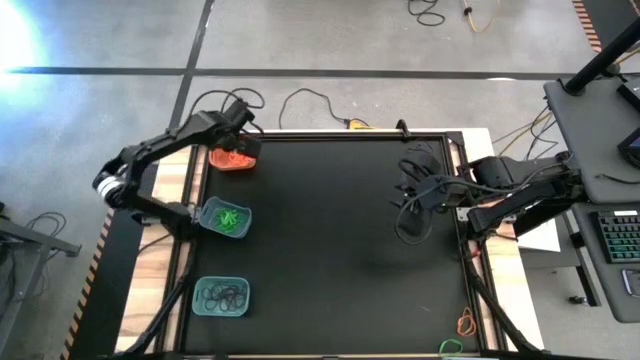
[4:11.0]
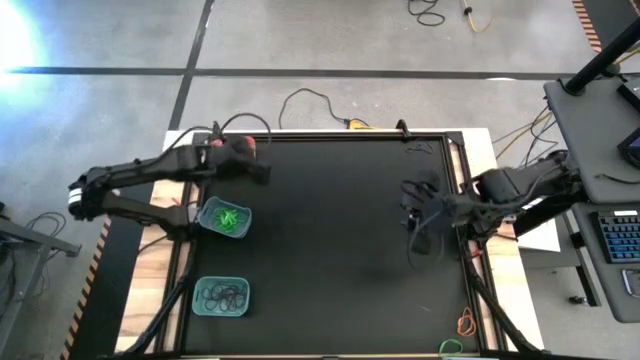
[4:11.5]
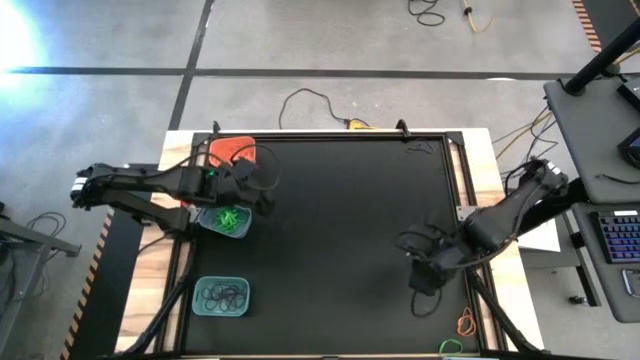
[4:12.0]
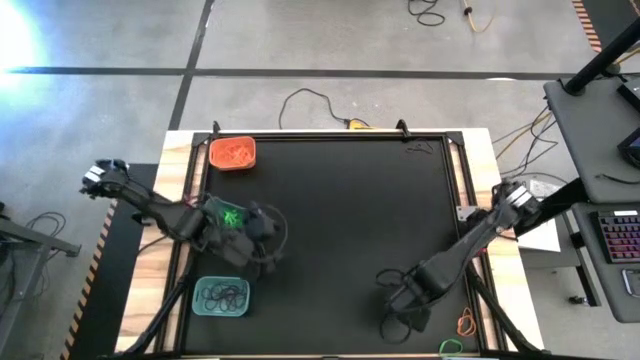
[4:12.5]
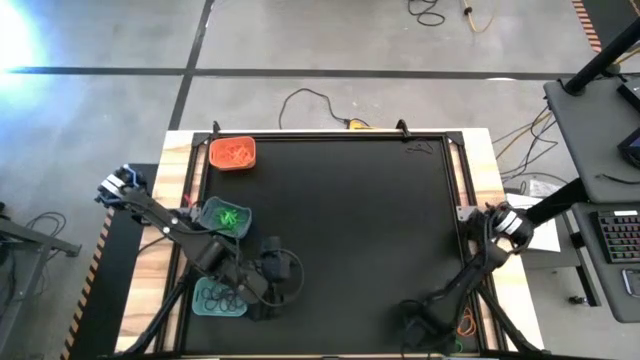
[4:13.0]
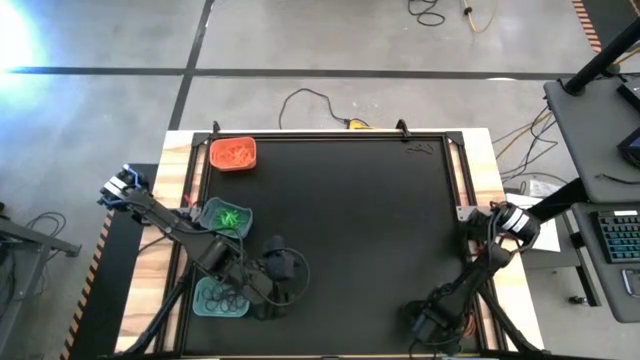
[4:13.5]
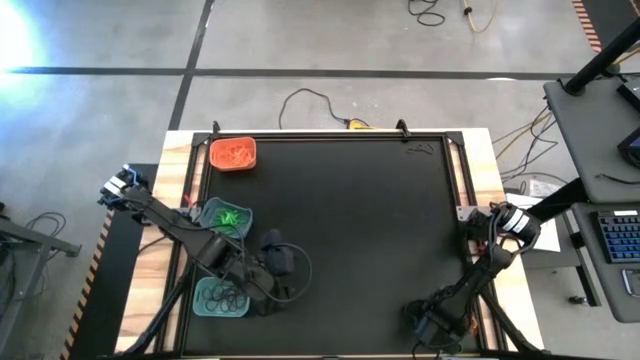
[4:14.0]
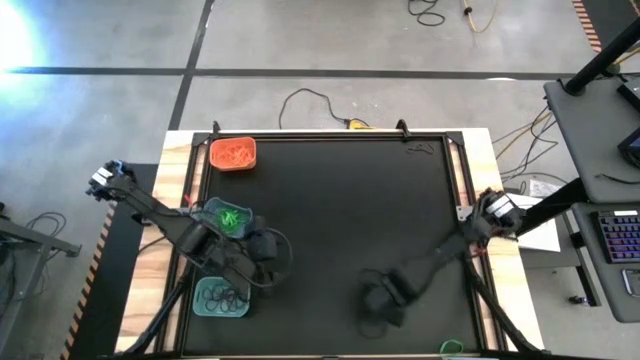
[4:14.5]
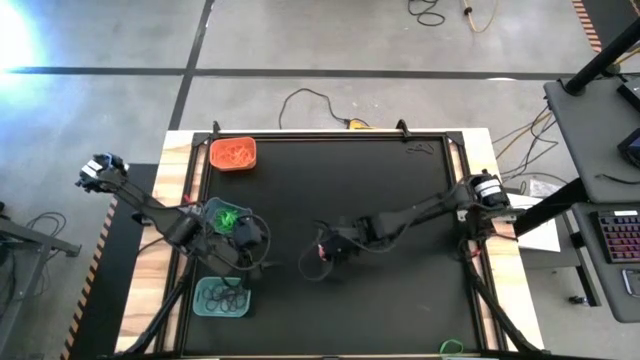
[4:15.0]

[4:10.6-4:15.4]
Task: Sort rubber bands into baskets
Put the orange rubber band into the orange bin

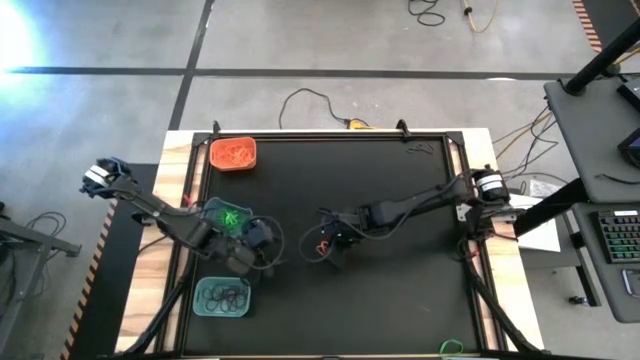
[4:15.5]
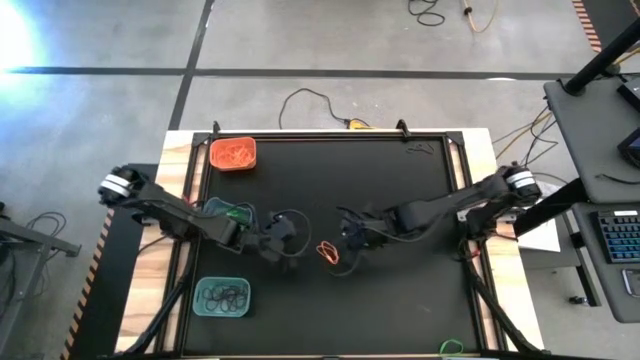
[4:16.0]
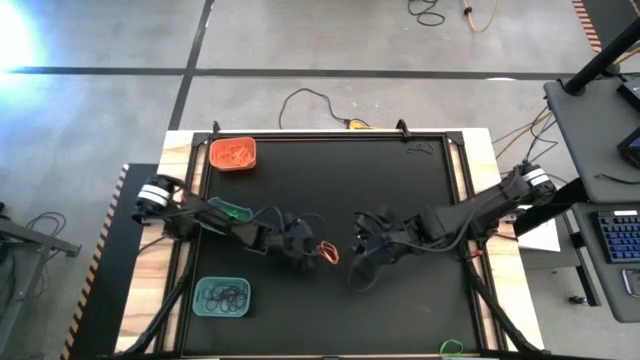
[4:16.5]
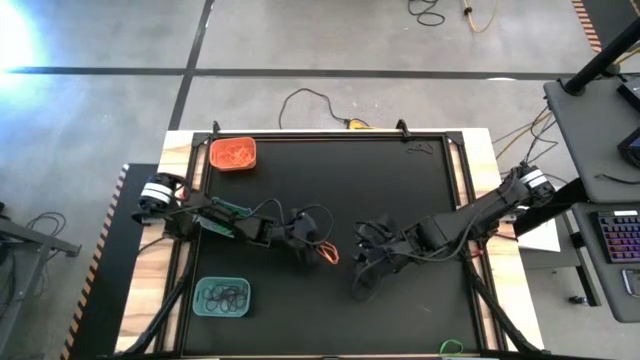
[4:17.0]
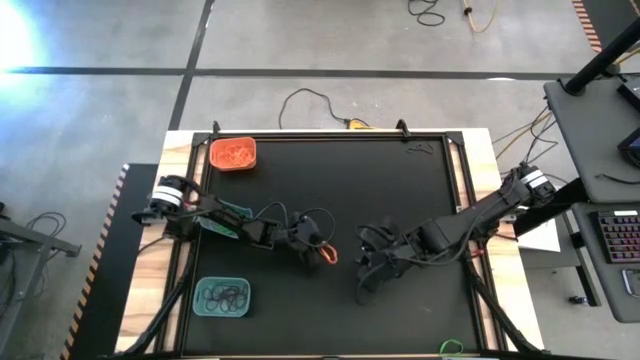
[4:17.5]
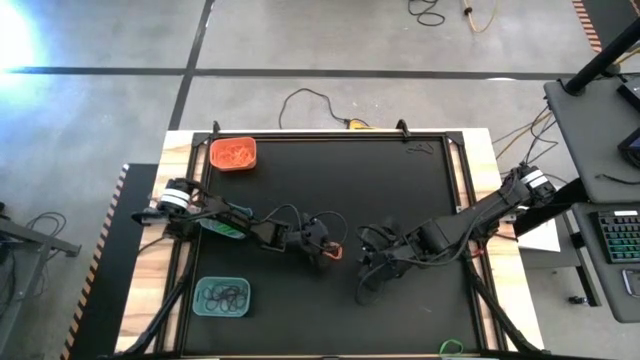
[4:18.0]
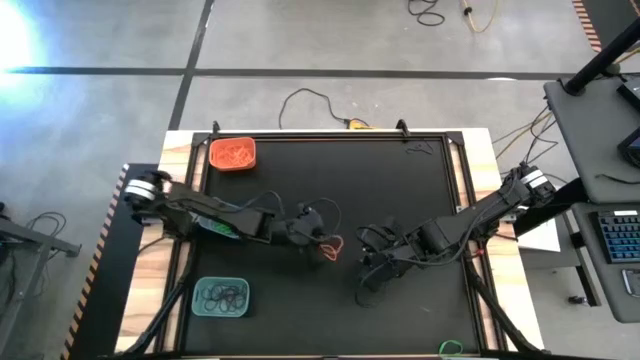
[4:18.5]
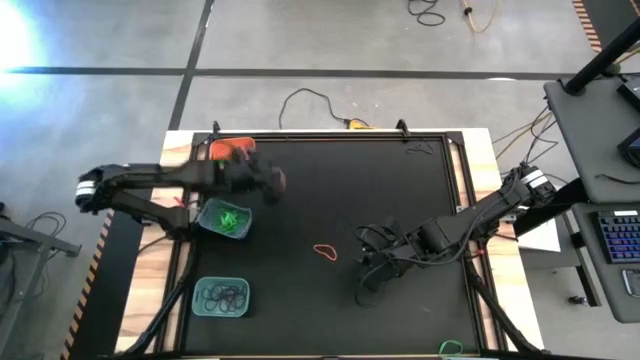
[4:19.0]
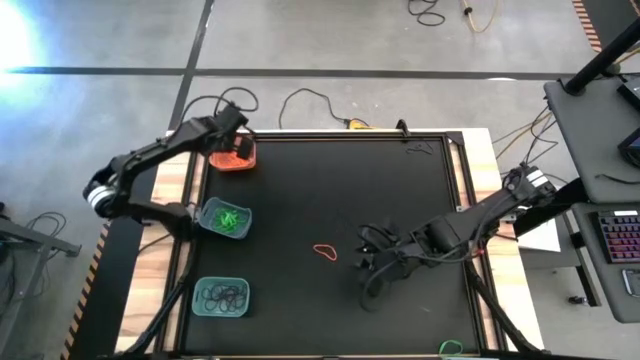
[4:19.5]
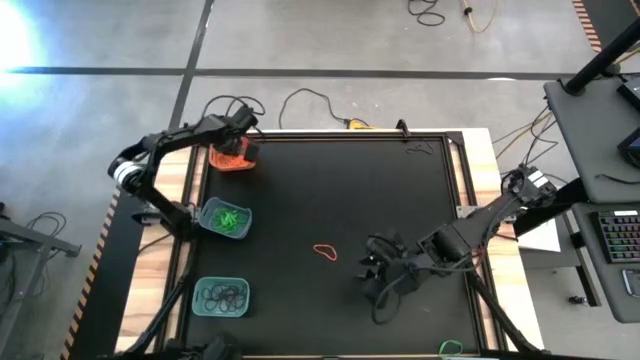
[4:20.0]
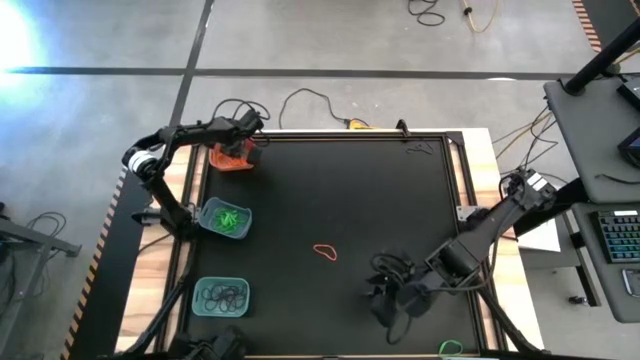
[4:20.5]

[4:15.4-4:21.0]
Put the orange rubber band into the orange bin

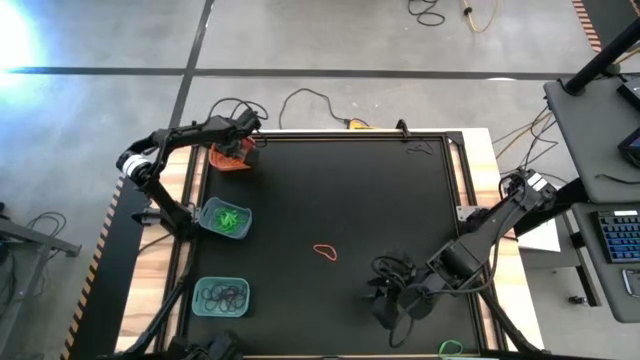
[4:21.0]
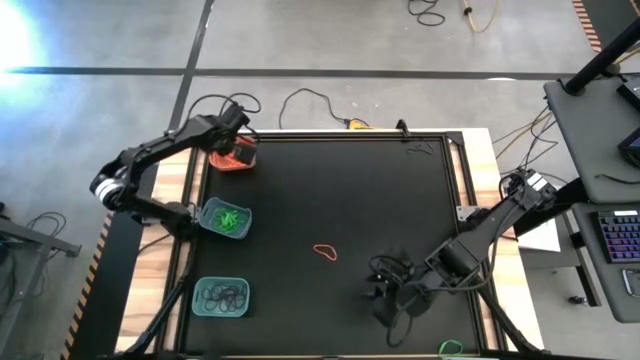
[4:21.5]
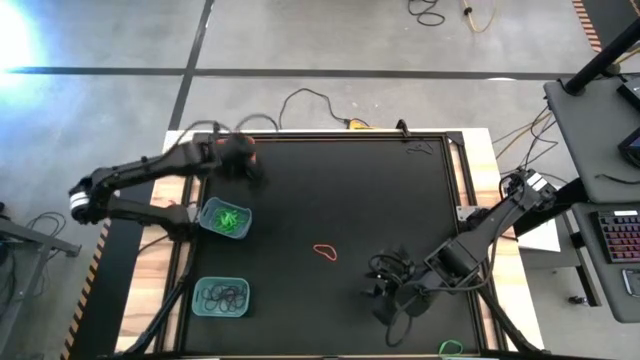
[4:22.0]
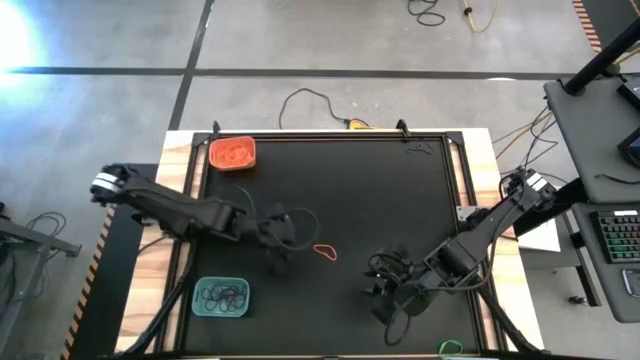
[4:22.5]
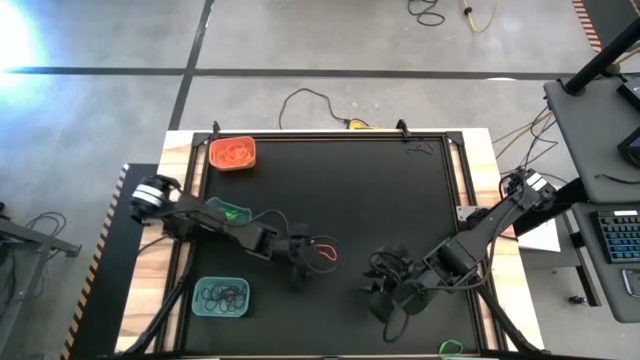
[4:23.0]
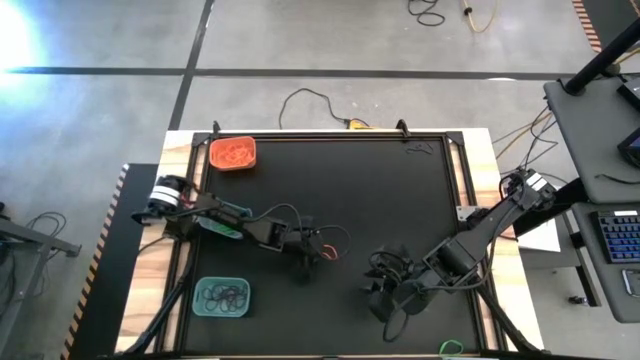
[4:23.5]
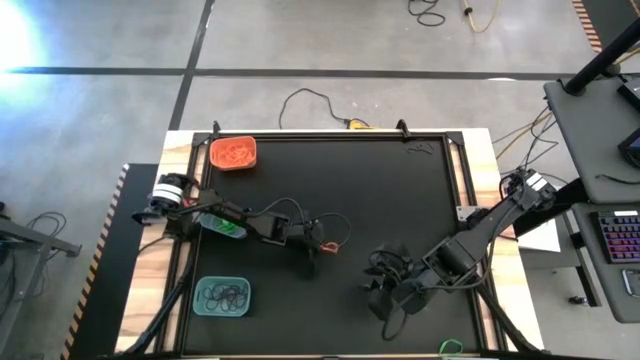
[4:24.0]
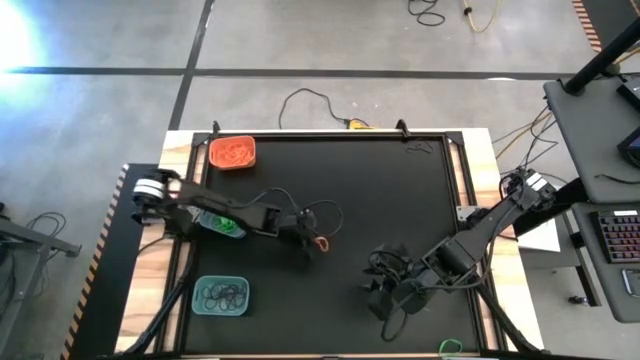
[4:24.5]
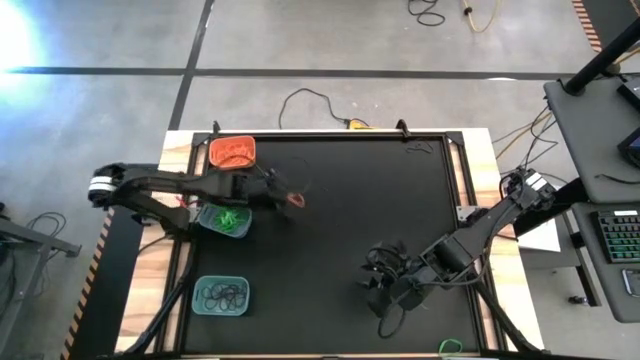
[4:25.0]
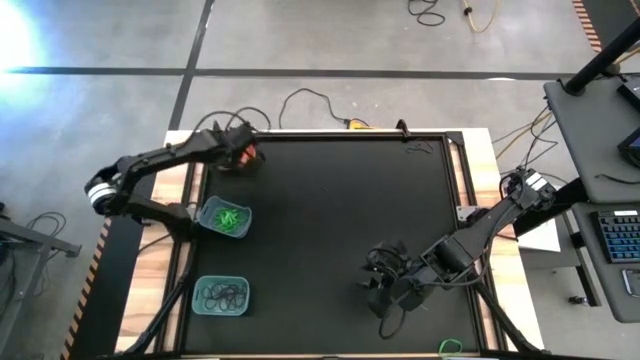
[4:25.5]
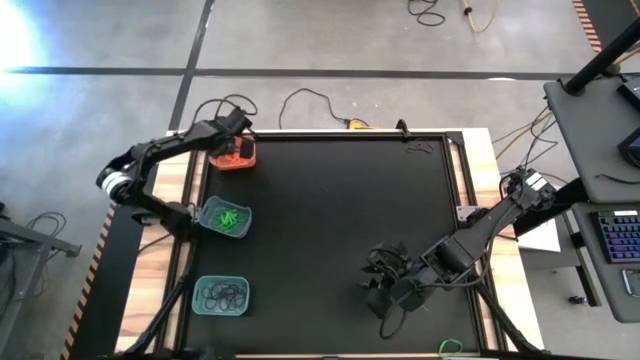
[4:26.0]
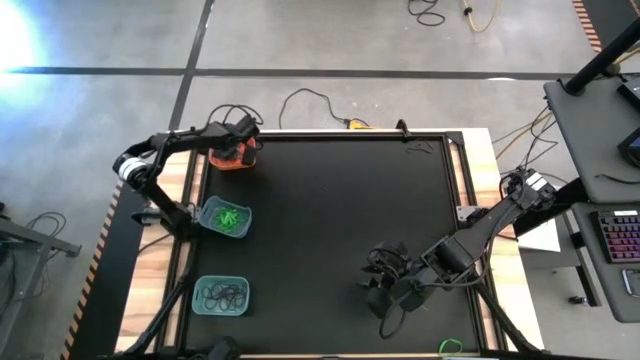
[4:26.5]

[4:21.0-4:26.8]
Put the orange rubber band into the orange bin

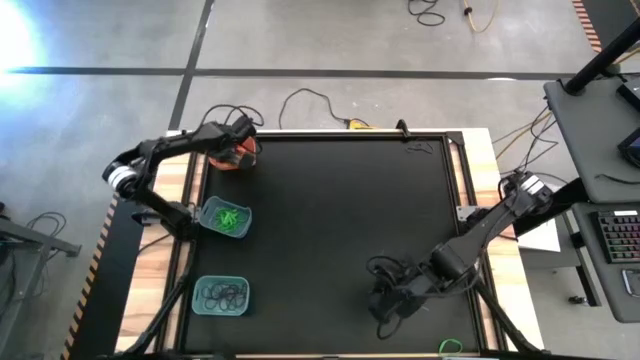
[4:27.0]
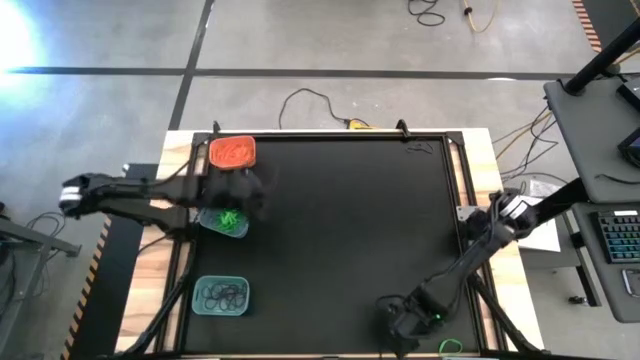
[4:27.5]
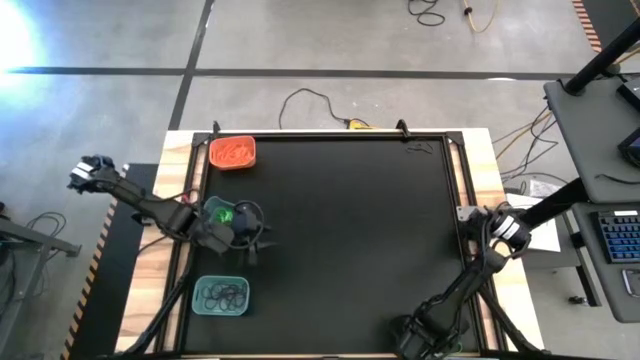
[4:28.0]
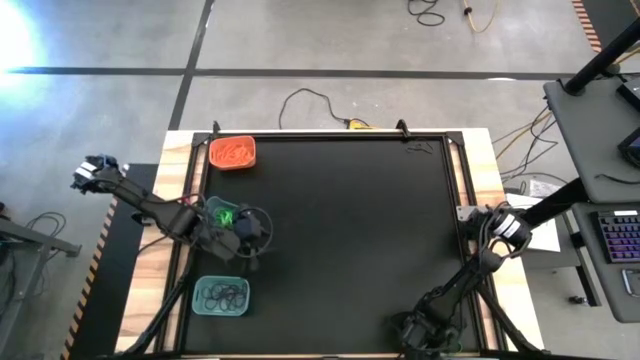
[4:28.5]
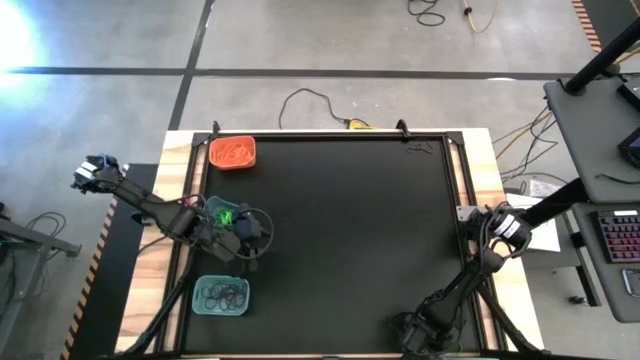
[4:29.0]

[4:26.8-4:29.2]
Put the green rubber band into the blue bin
